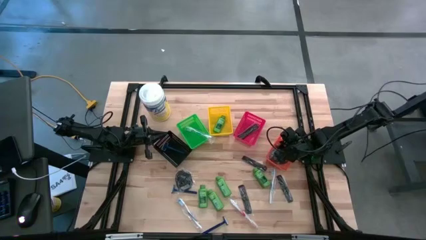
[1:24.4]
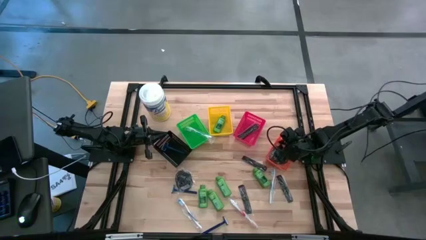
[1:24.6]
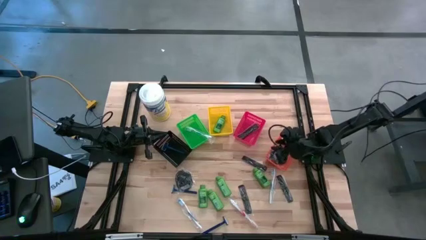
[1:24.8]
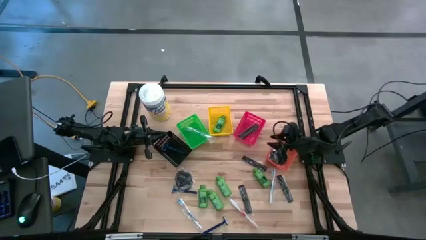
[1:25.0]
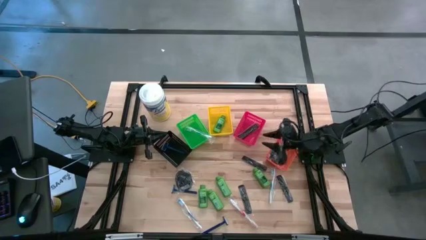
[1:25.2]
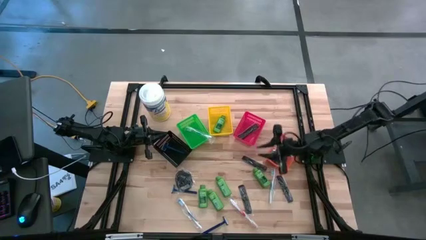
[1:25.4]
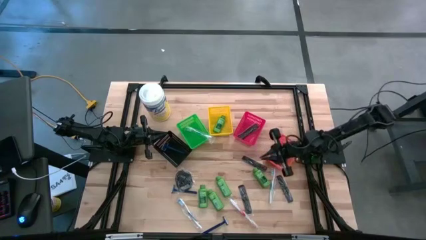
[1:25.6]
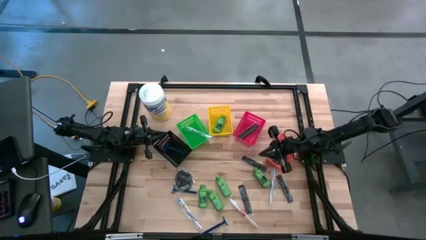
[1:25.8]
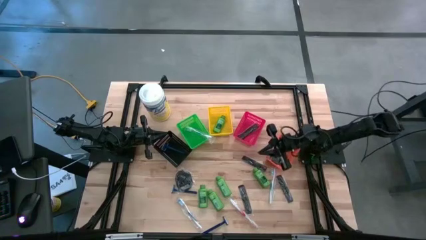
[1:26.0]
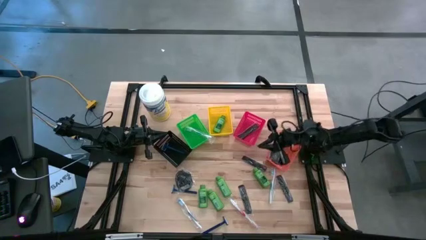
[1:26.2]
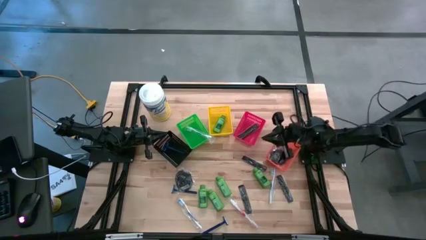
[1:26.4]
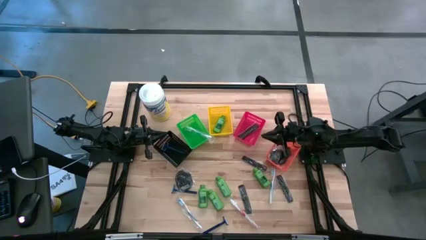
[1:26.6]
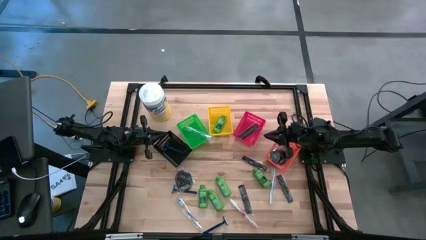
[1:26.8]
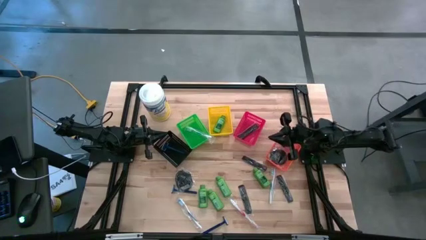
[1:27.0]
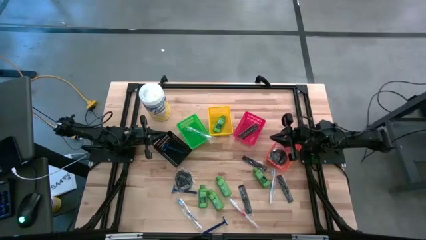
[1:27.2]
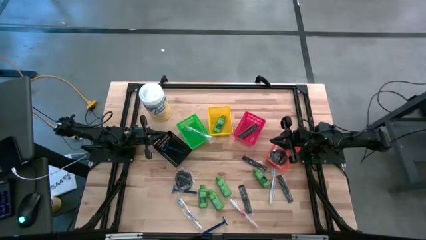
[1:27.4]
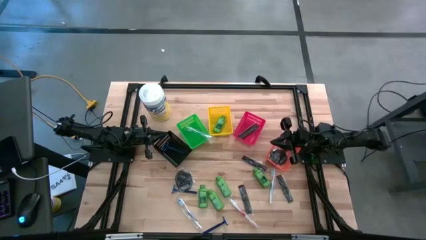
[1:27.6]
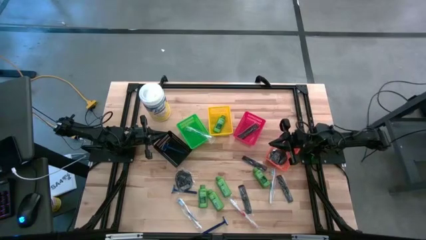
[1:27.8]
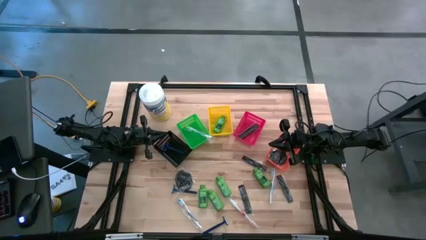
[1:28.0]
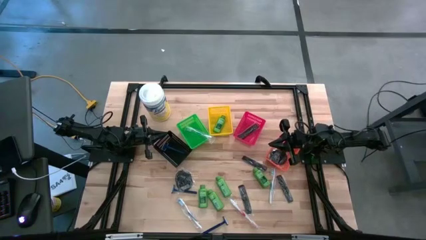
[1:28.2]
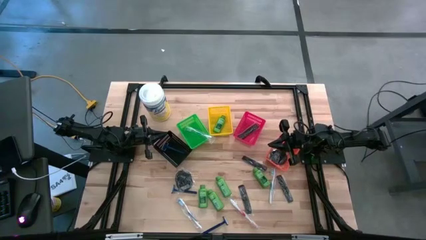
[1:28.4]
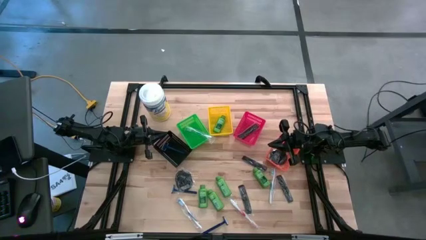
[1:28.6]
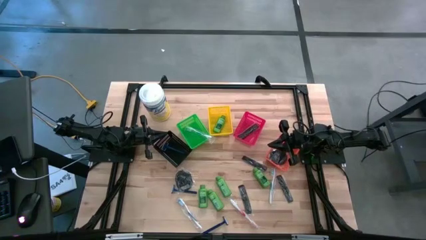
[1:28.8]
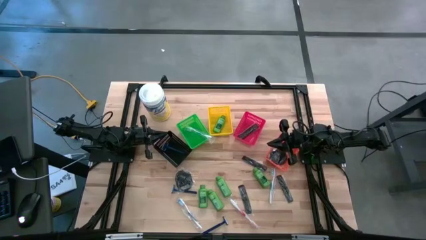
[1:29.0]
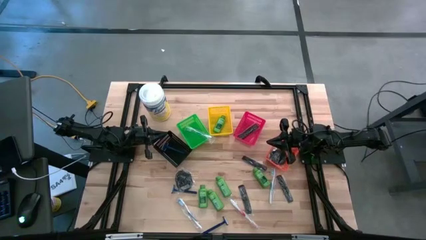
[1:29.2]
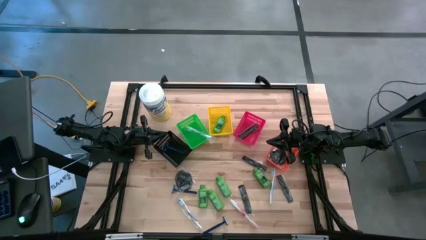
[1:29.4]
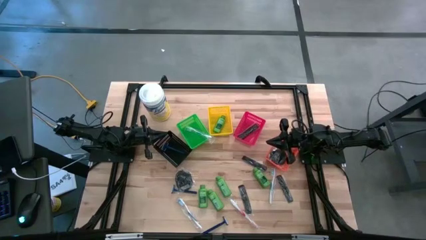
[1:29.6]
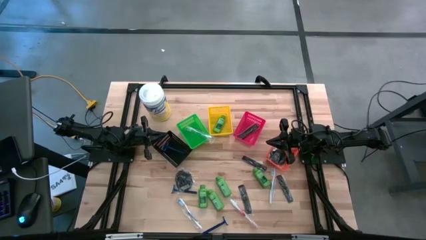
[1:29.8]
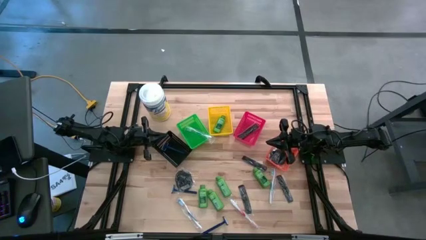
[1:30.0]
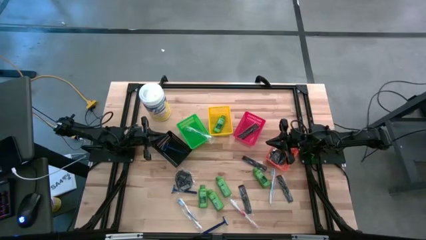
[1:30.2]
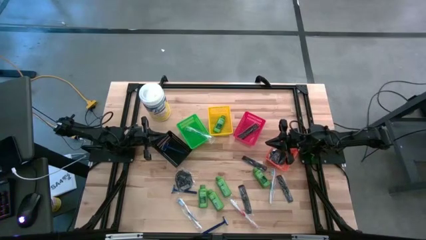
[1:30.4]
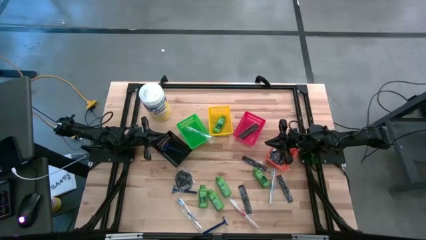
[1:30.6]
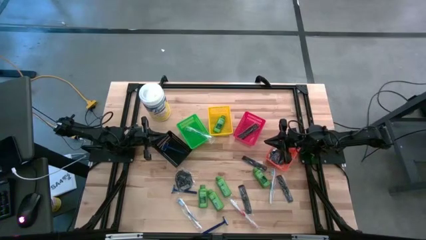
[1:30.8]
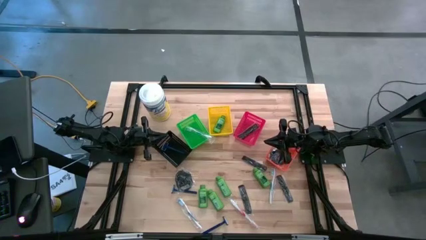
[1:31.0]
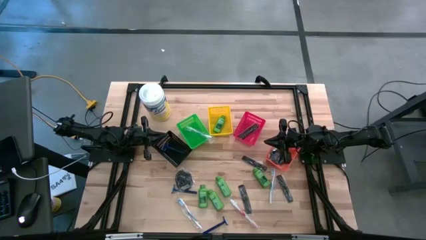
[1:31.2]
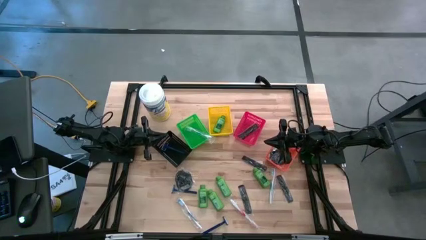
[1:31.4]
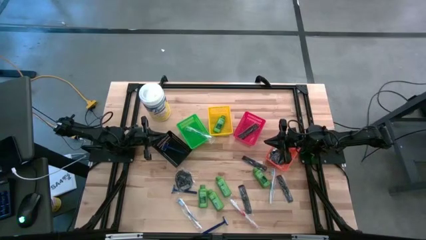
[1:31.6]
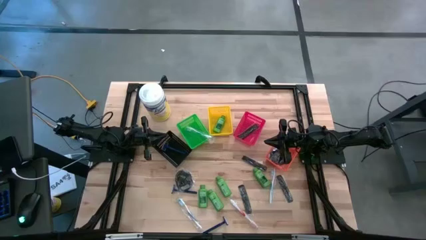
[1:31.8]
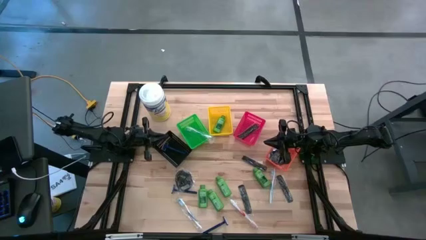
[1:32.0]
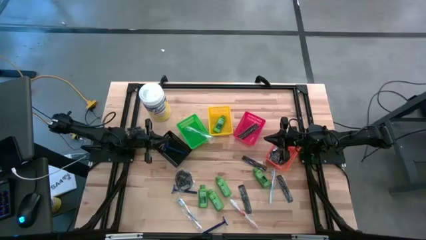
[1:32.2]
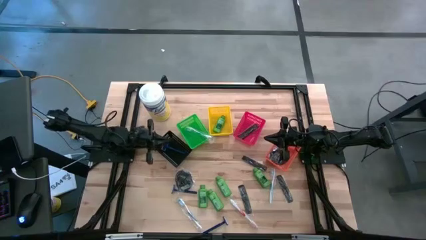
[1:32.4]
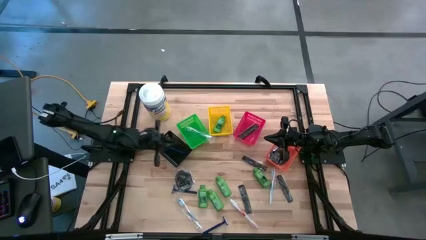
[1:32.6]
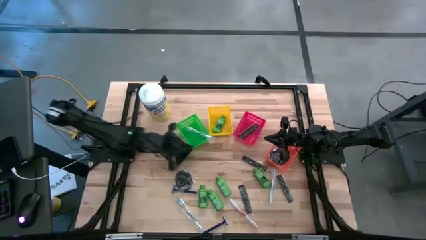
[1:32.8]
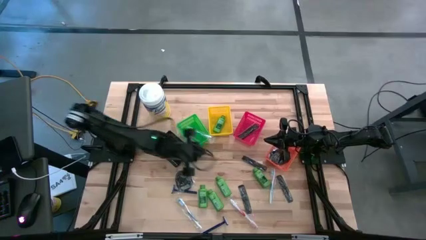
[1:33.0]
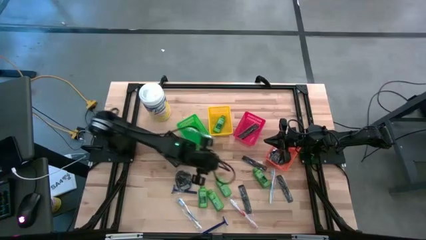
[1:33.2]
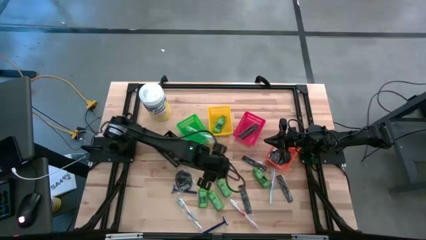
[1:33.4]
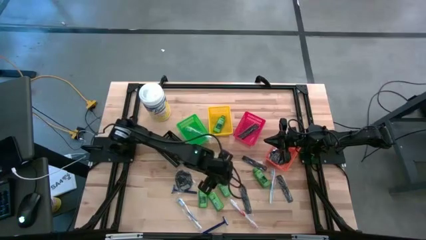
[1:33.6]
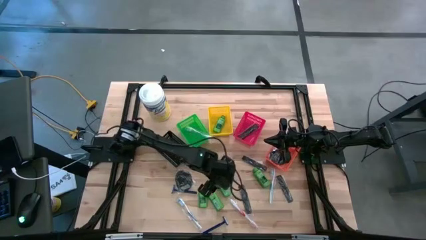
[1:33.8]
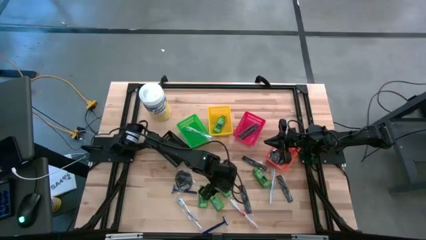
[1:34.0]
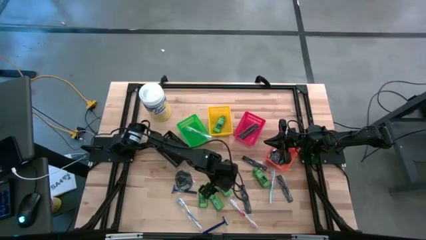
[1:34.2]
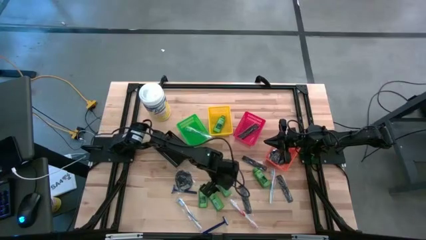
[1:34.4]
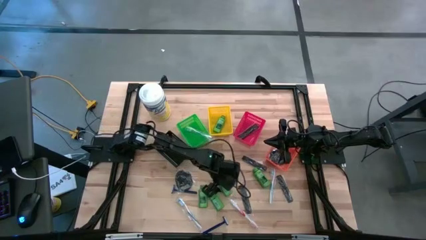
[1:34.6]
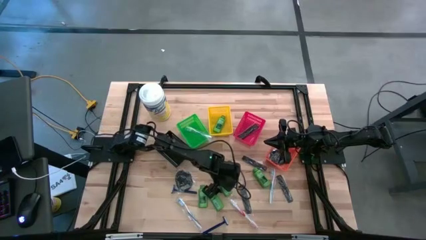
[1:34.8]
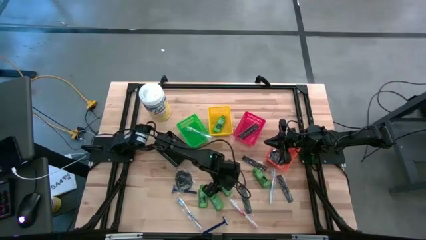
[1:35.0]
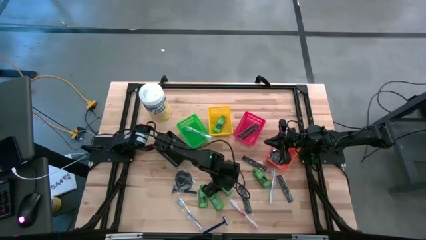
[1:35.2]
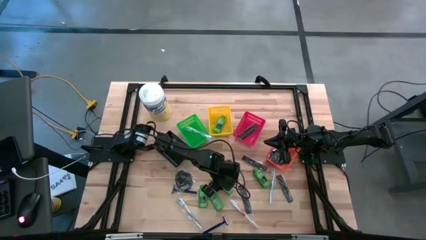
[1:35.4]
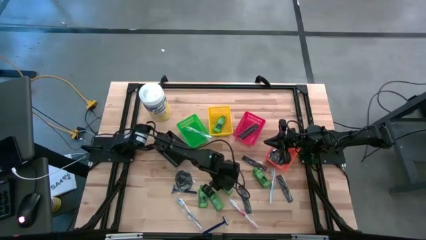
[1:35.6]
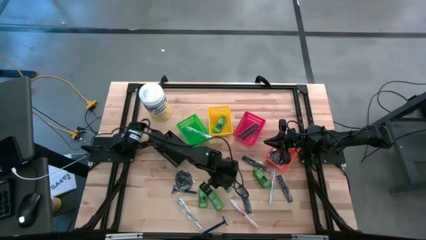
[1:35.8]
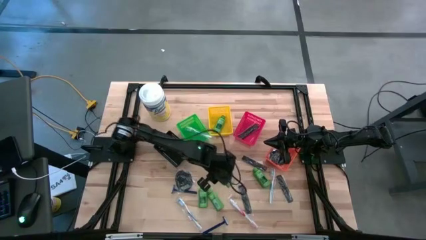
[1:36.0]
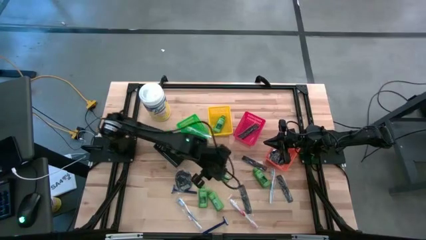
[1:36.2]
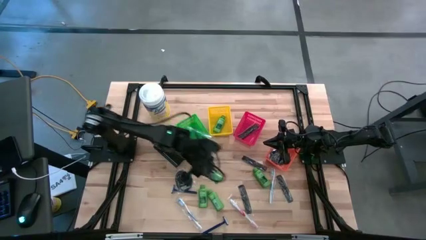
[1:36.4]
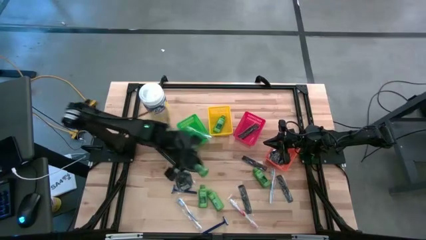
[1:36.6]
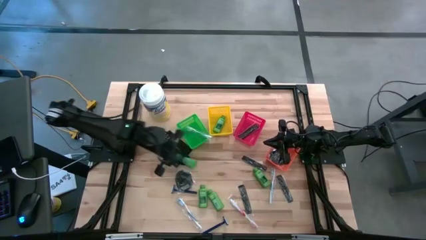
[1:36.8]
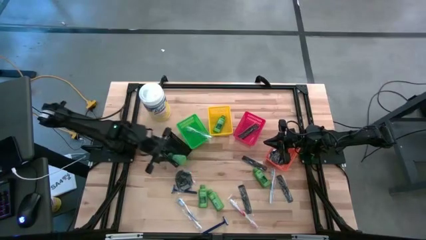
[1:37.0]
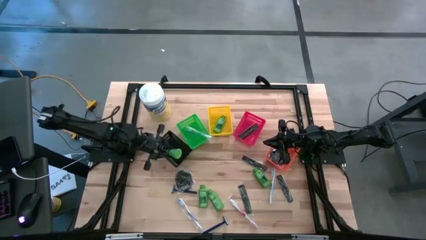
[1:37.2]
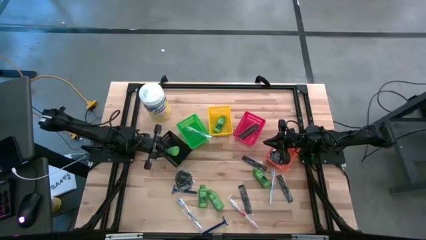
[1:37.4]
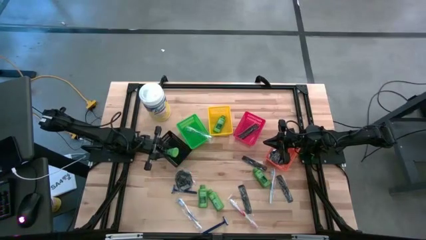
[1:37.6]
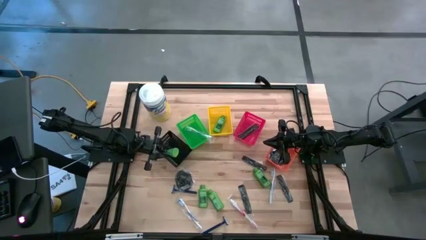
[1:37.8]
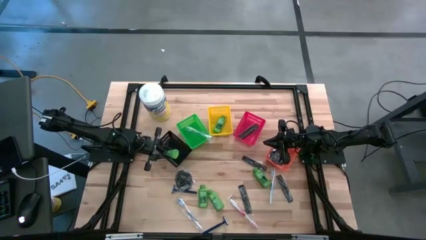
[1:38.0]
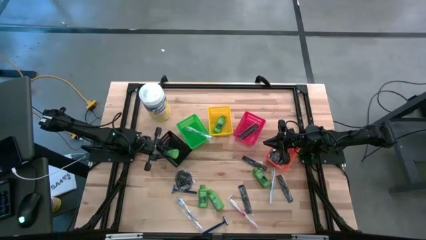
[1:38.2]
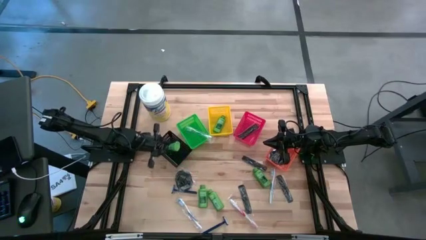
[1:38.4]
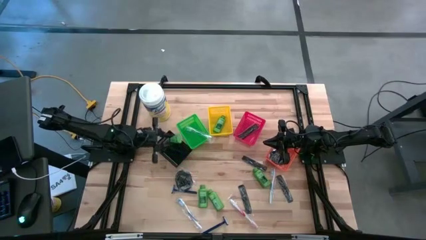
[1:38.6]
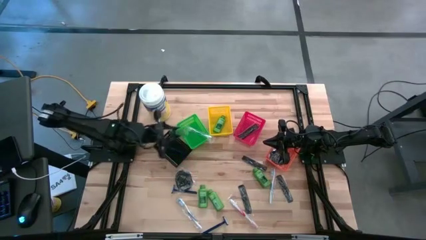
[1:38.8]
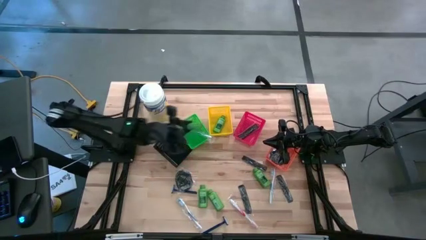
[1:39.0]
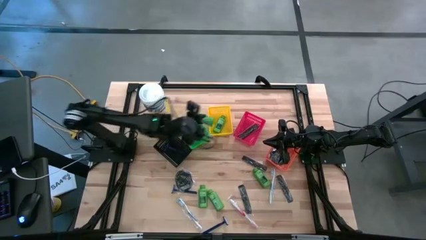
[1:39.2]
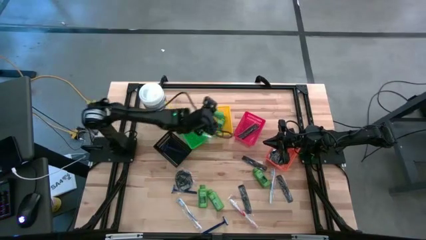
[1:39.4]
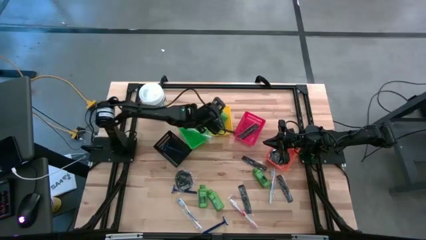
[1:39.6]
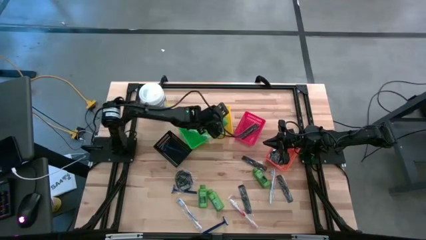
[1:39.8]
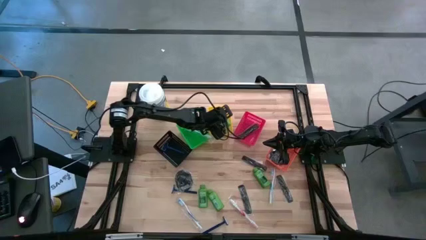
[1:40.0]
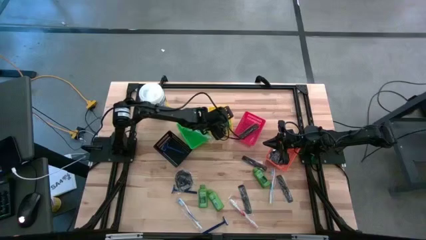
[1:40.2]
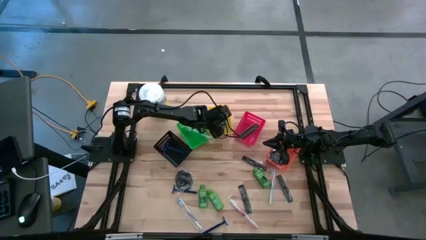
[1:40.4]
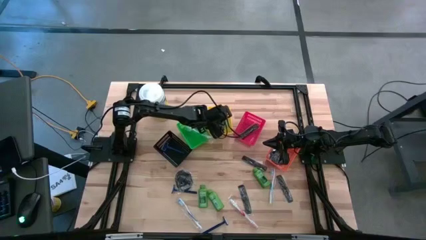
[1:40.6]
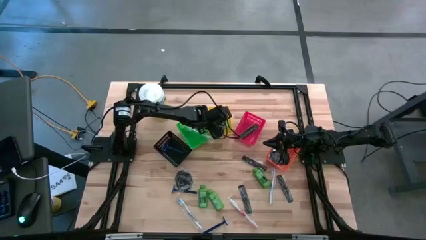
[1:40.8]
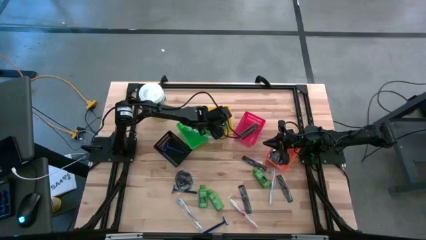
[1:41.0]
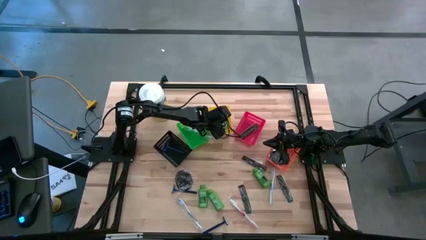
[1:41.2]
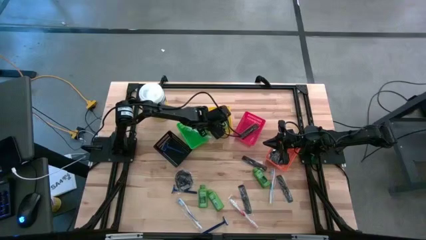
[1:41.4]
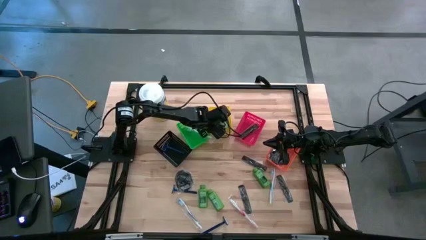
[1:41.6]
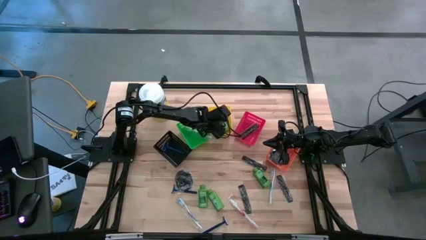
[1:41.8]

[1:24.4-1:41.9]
Task: Pick & Place Travel size toiletries
Put the green shampoo bottle into the yellow bin
